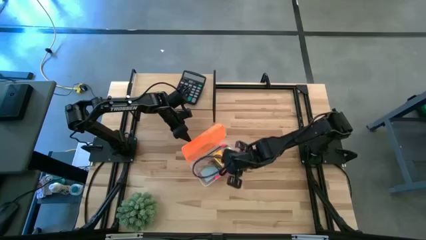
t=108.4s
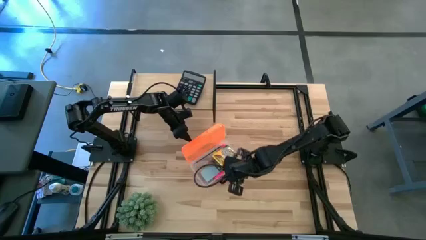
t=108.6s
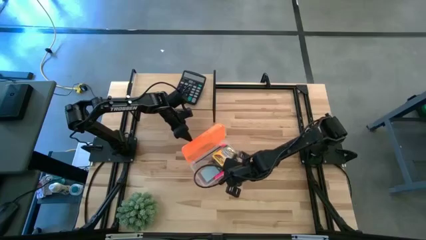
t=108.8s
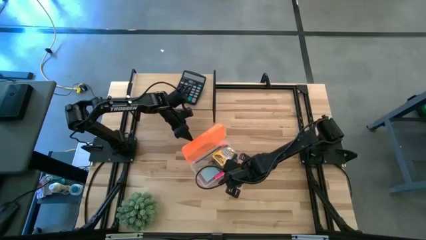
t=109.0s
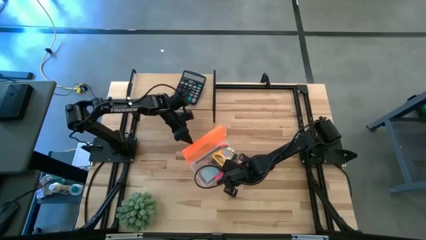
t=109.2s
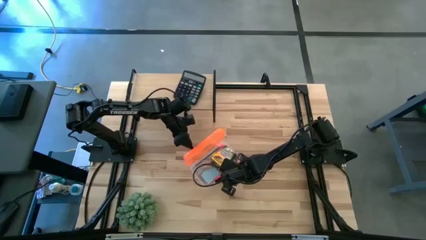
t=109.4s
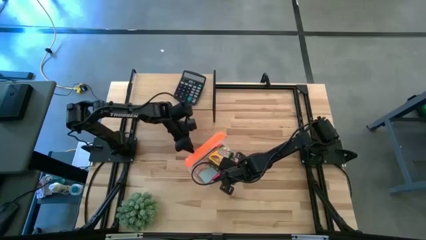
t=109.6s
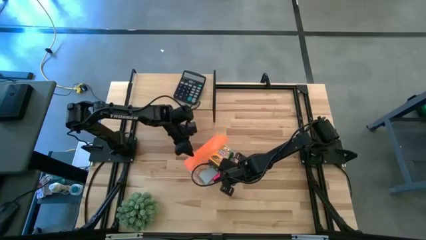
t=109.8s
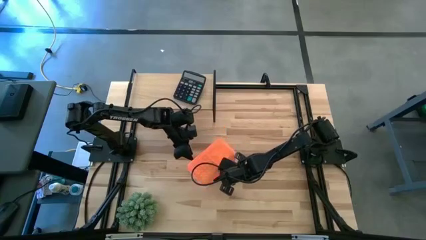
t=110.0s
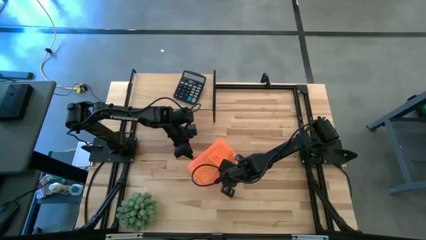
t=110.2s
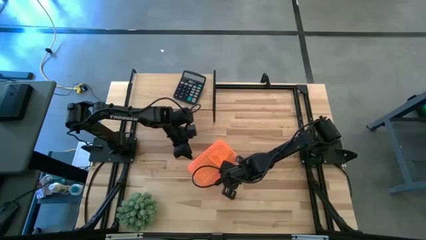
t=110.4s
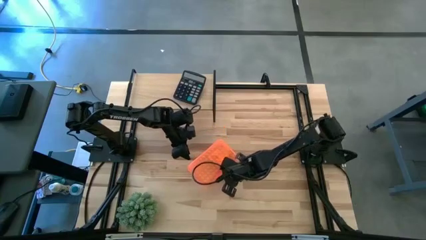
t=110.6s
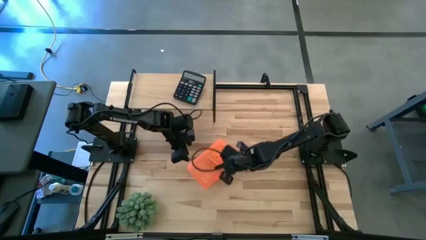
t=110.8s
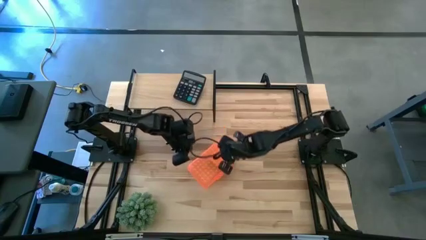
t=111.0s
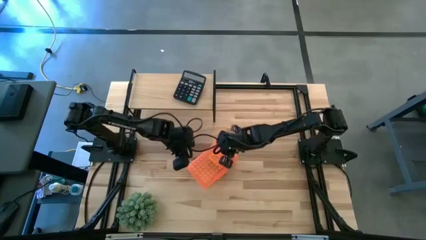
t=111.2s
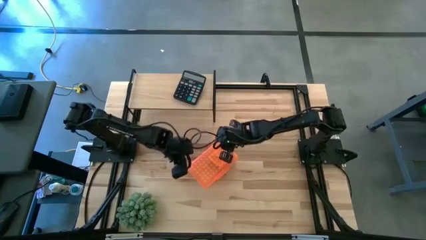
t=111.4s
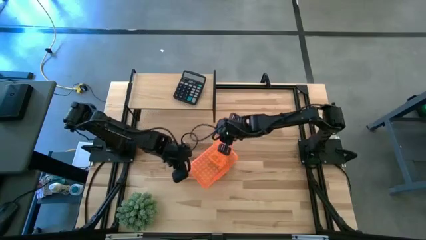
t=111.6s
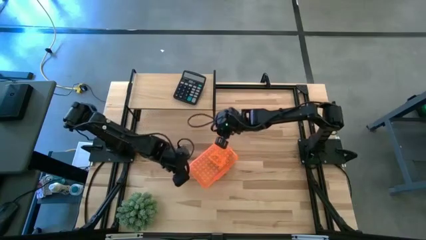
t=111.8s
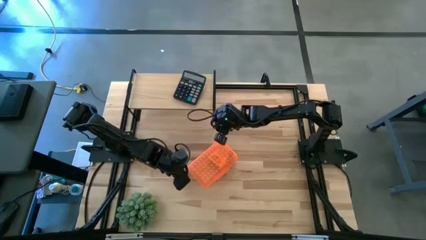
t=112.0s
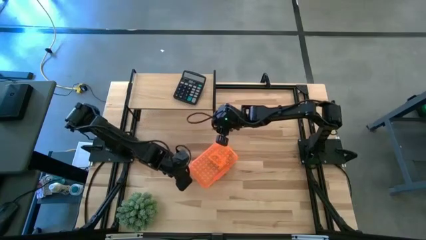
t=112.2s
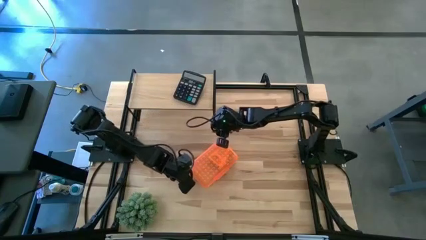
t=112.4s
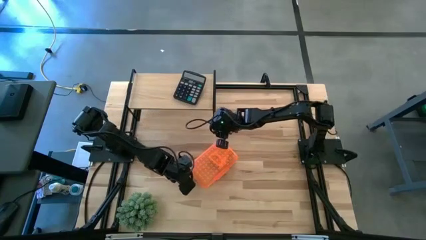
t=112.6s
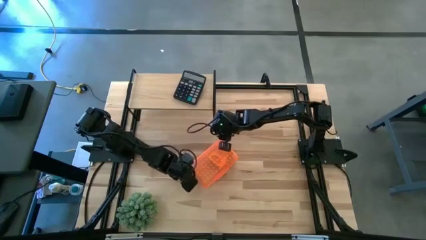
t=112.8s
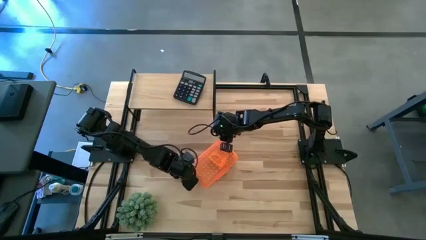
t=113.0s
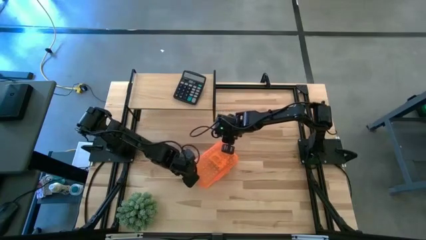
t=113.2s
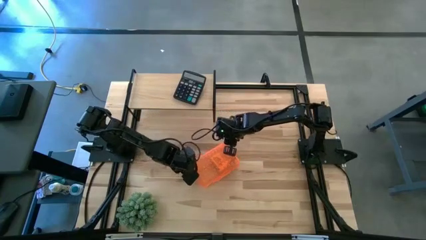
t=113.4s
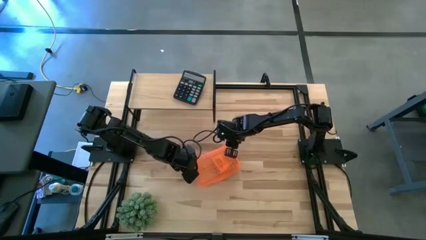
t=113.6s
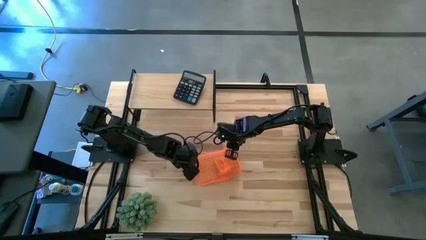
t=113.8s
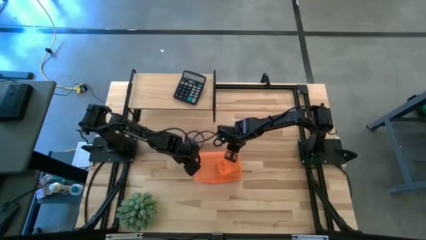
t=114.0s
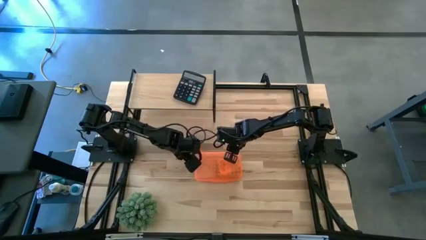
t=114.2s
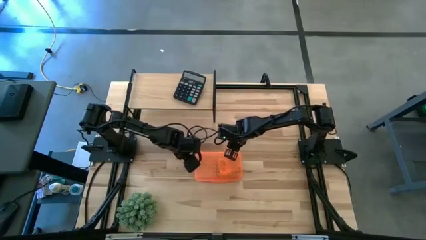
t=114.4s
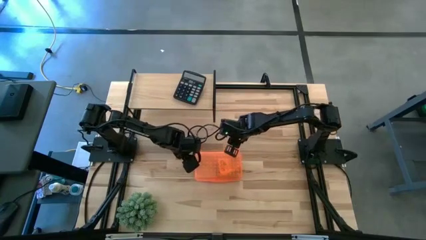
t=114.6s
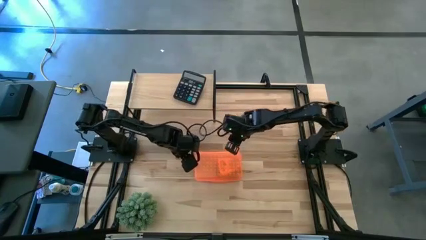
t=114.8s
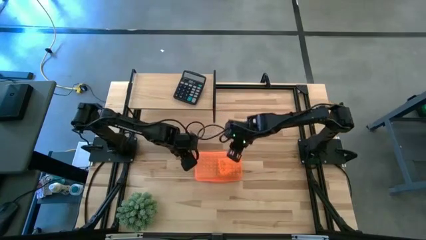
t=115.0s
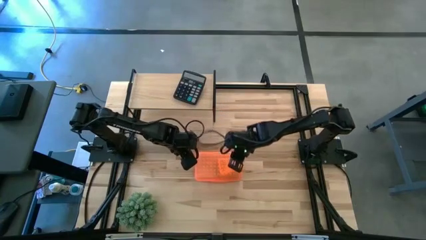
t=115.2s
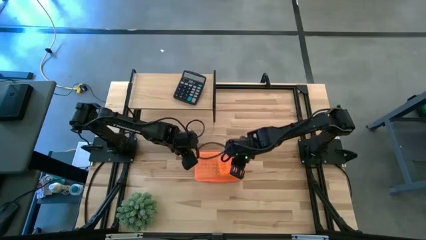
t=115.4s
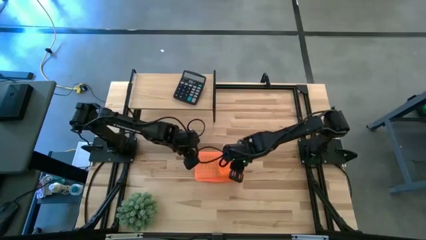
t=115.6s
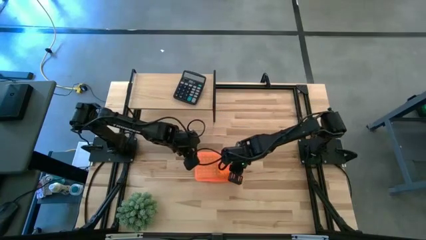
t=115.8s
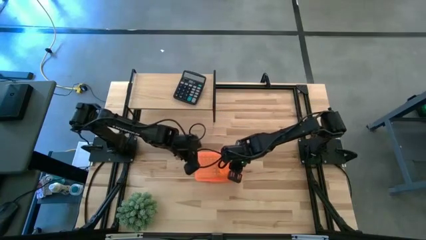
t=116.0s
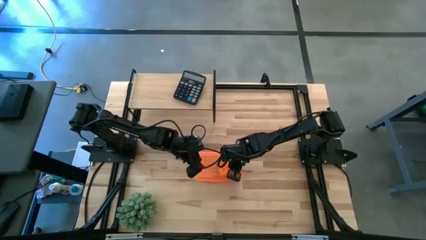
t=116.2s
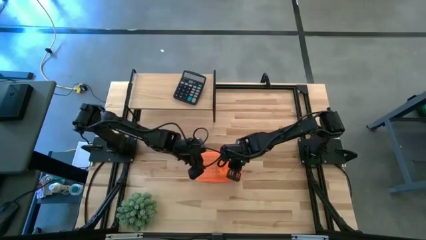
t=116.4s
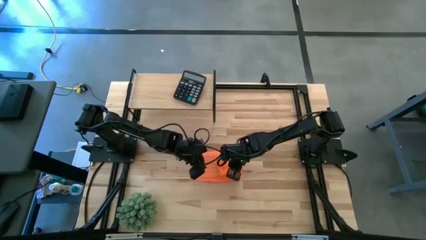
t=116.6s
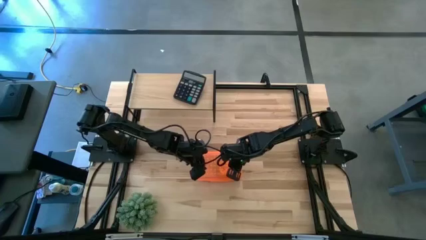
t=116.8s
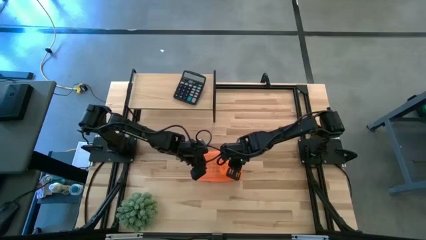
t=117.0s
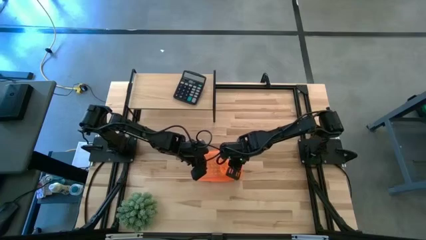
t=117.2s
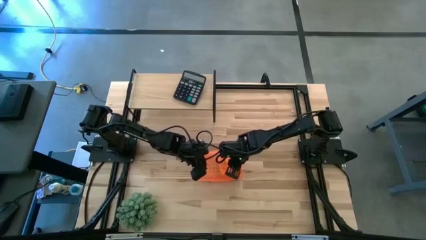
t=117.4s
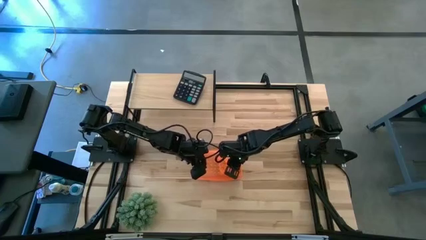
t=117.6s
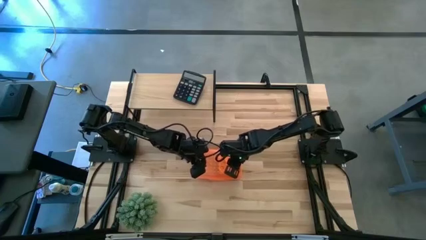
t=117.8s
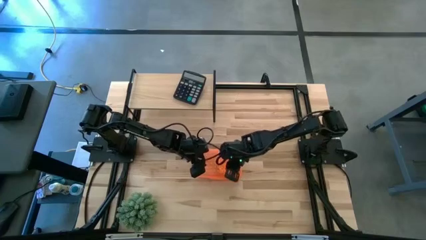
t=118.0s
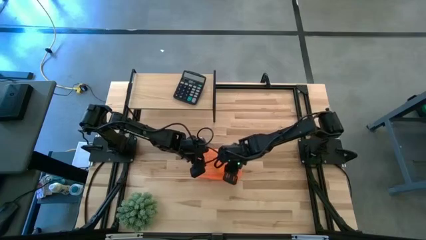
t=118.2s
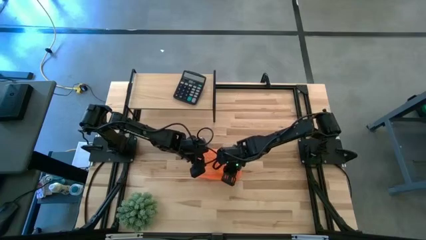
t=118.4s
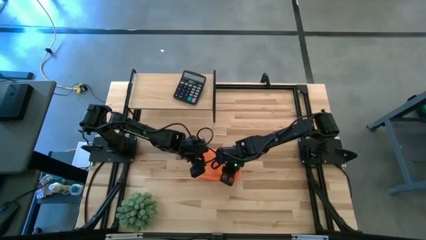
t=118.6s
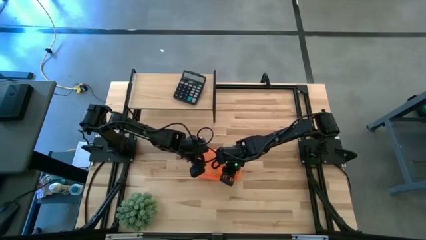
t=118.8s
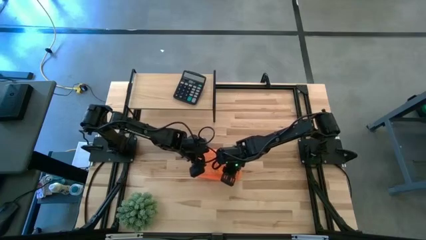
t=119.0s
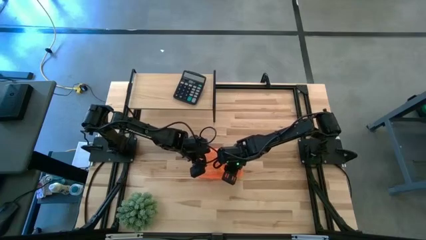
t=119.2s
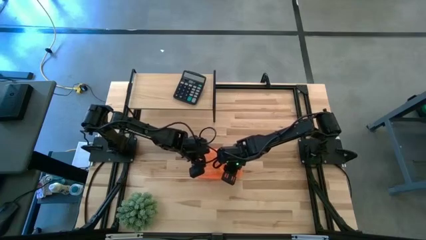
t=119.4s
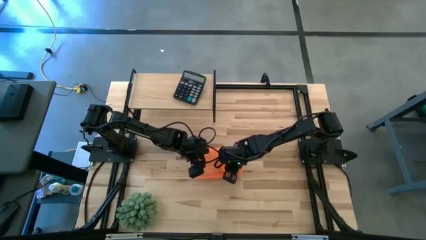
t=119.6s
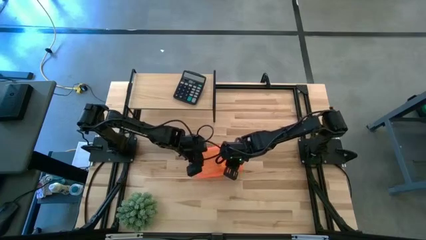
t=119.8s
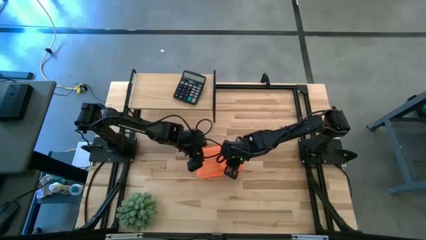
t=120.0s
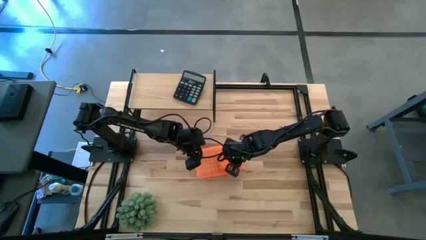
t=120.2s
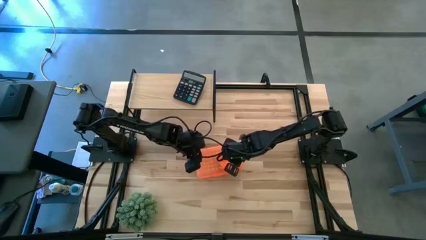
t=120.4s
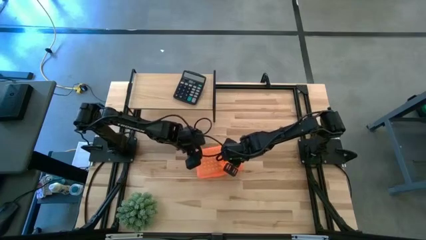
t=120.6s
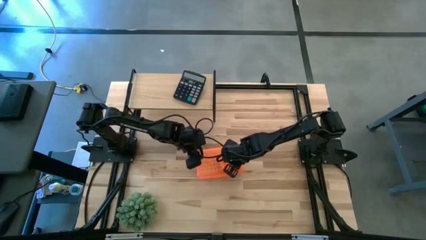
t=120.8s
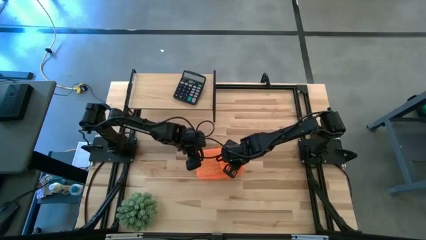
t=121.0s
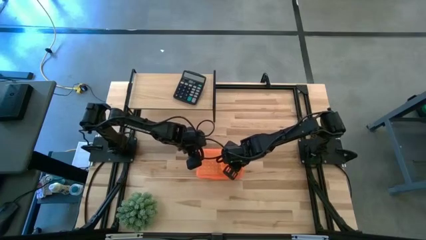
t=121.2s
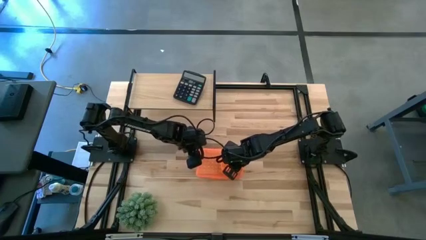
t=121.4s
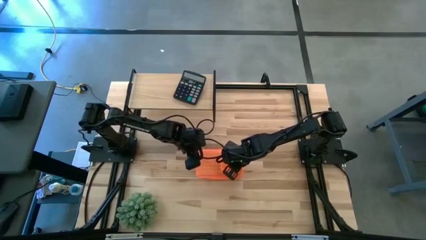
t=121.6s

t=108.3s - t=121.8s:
Task: Pack school essentials
Close the school supply box
